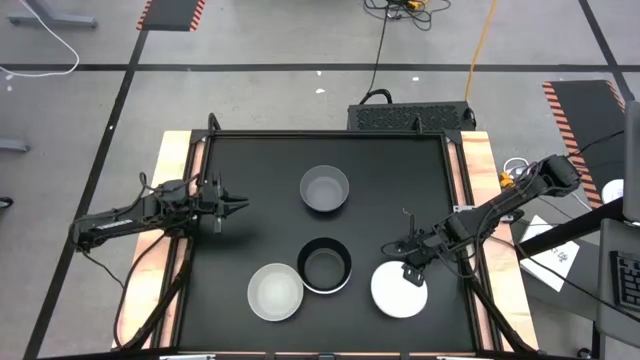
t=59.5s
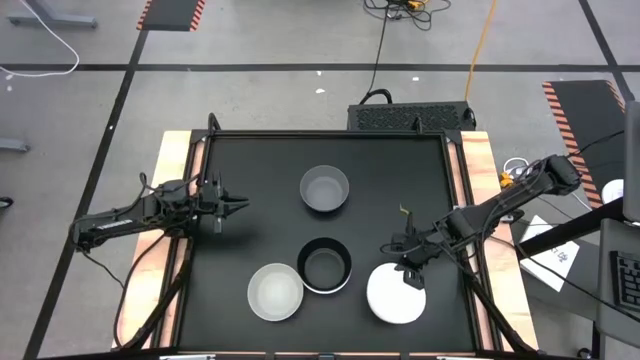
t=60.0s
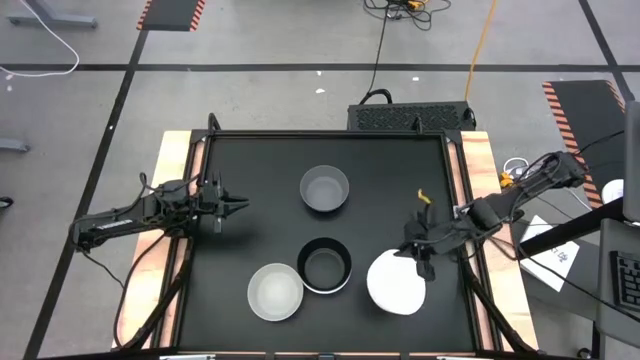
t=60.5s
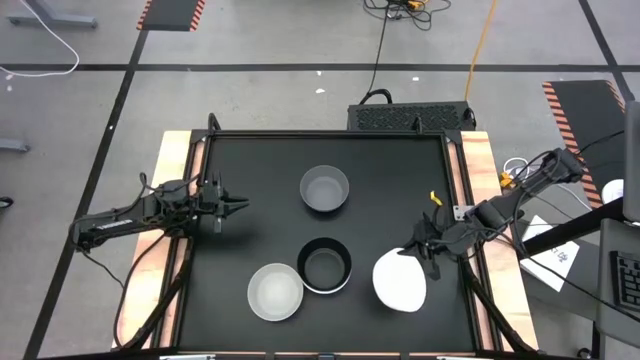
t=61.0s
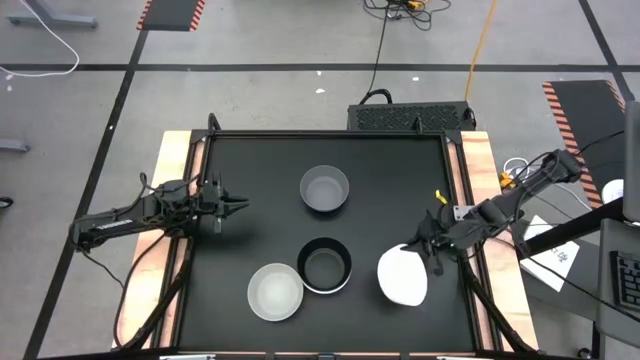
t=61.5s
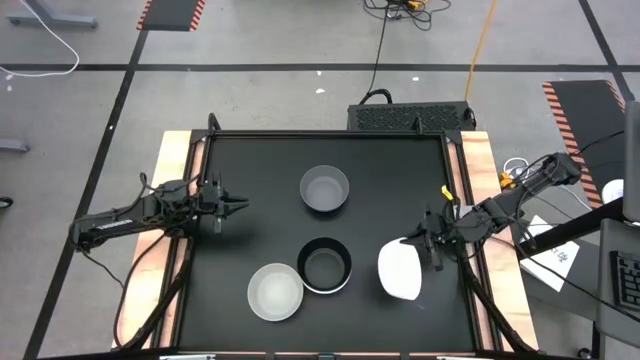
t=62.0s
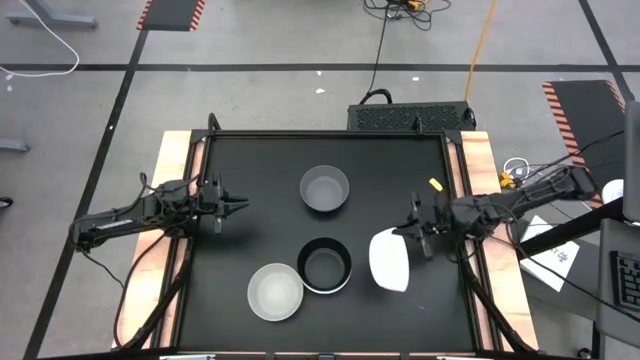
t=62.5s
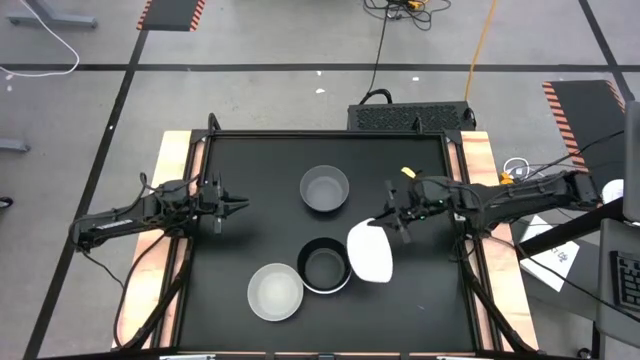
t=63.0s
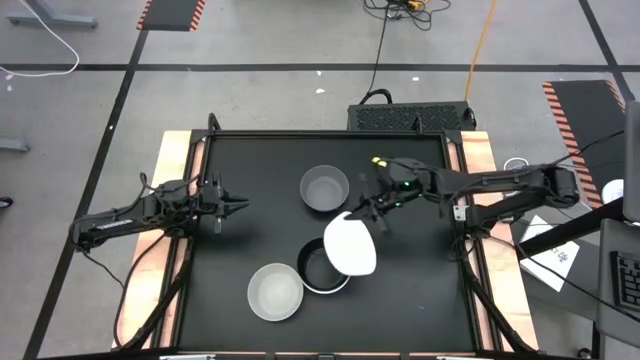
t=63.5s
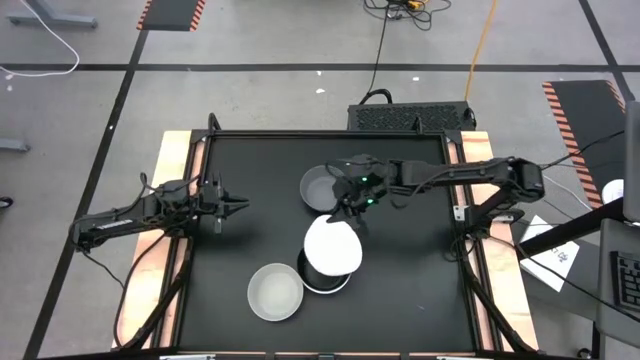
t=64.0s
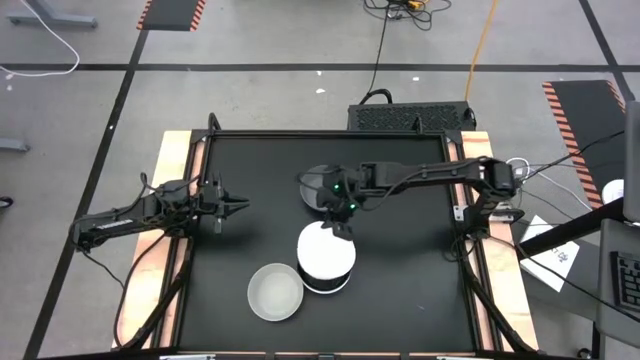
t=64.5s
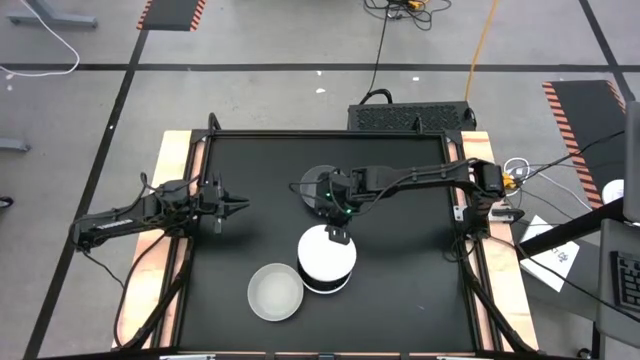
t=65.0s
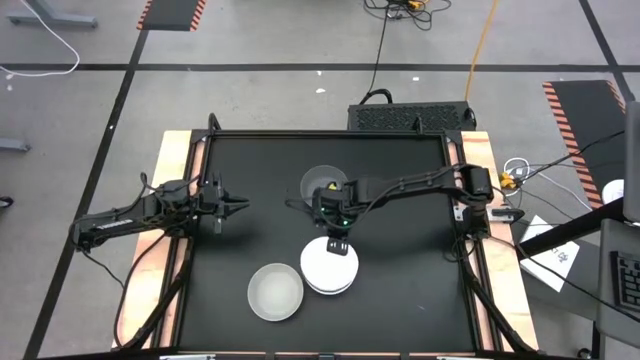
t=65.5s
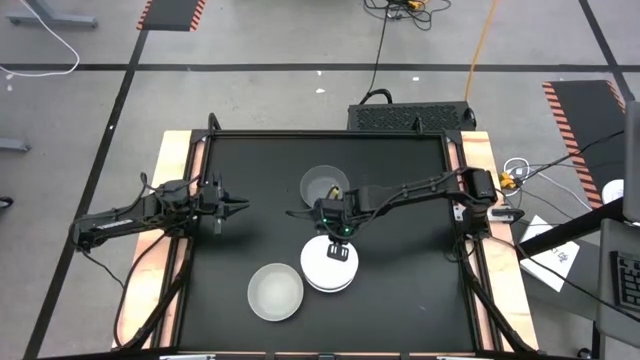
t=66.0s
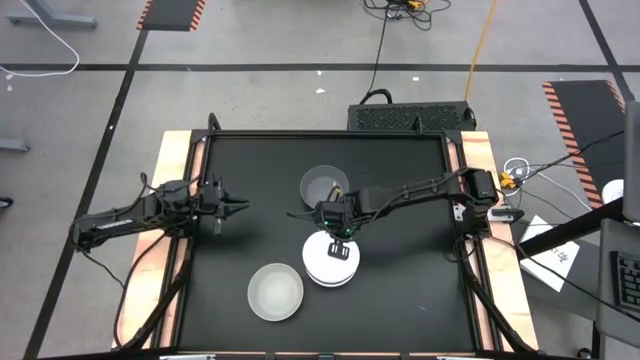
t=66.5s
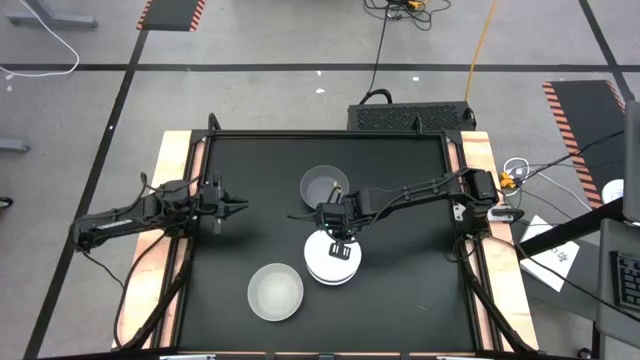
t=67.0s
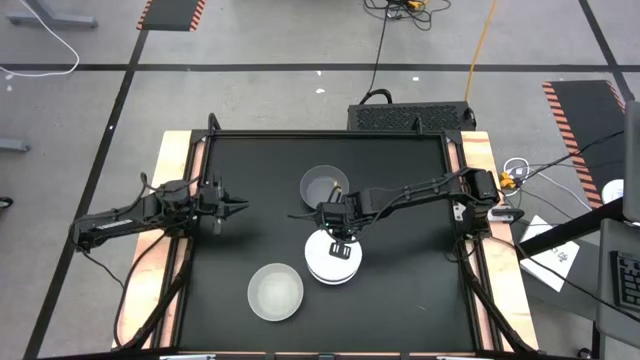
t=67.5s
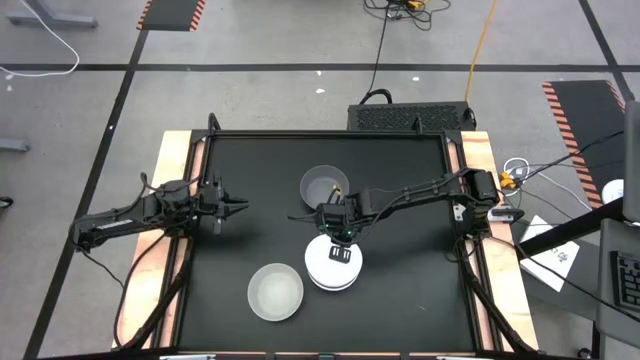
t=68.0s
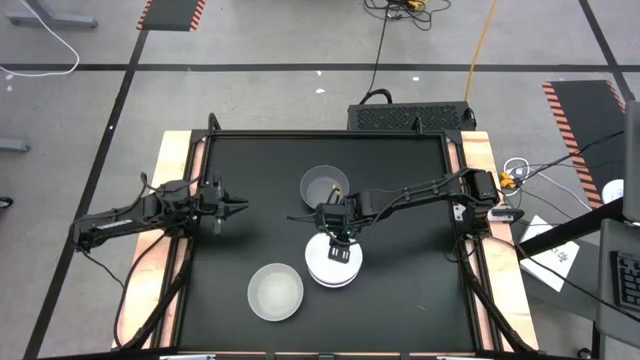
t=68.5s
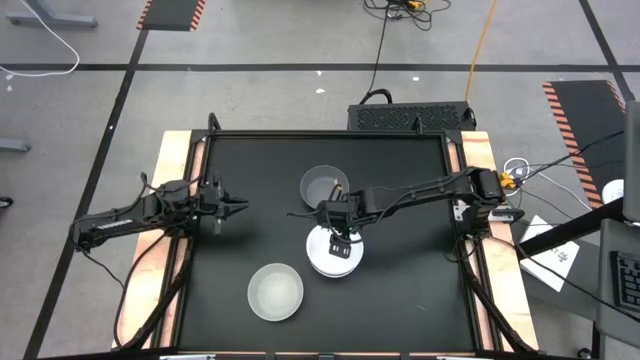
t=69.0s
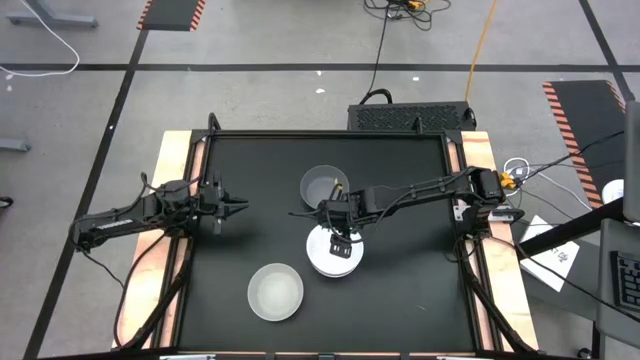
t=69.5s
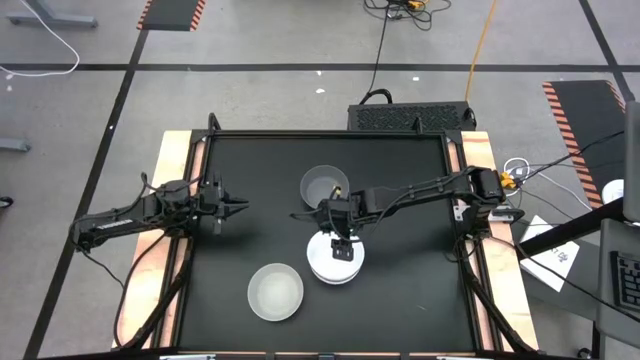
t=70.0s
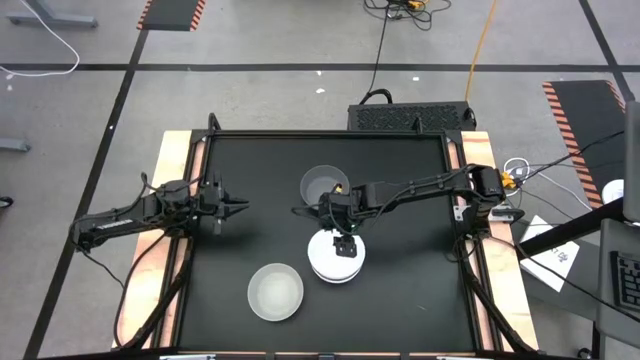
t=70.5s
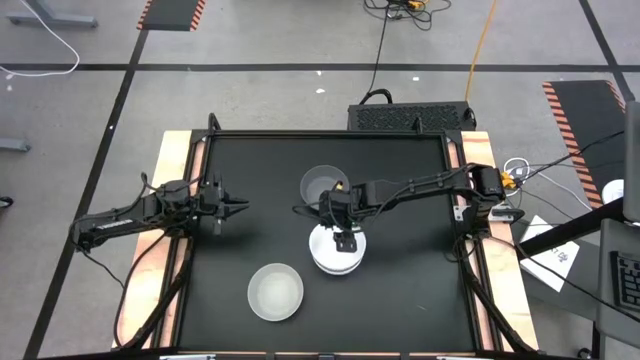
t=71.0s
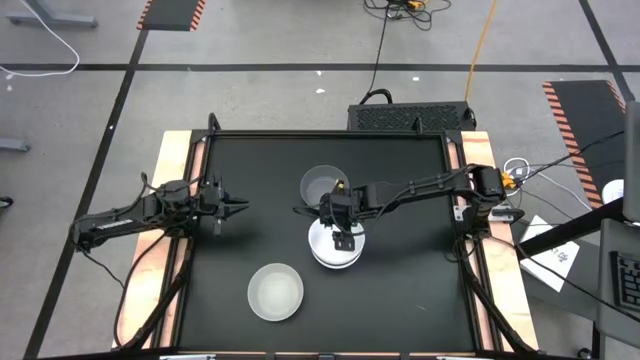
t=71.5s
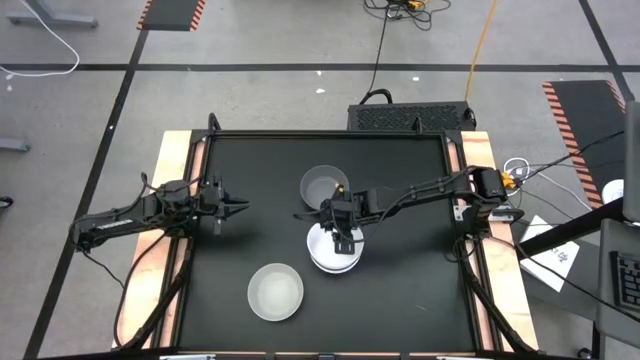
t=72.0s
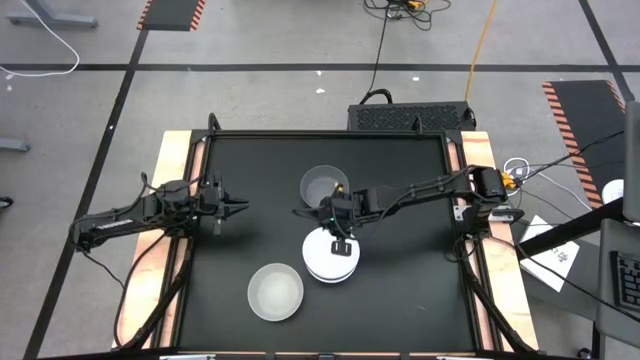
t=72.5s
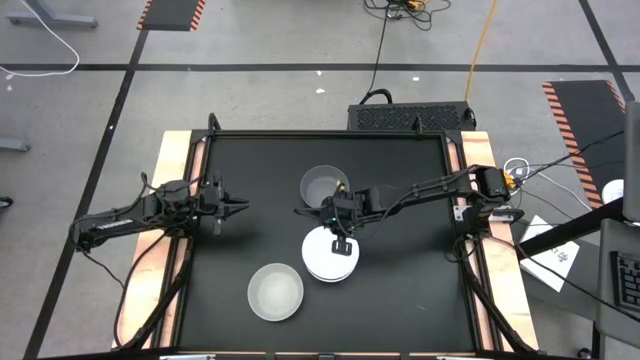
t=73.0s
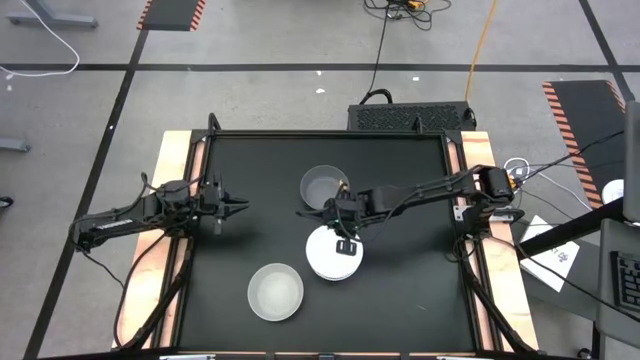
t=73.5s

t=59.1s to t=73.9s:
Task: Nest bowls inside each other
Stack the white bowl on the black bowl

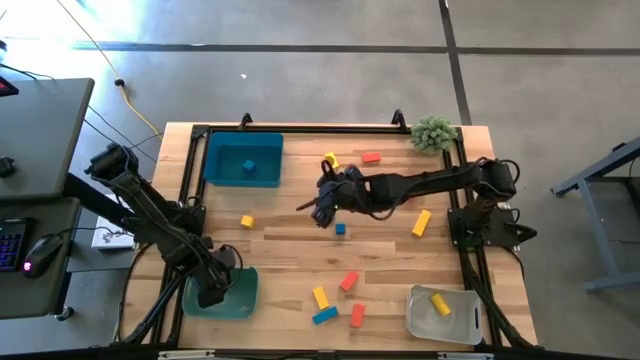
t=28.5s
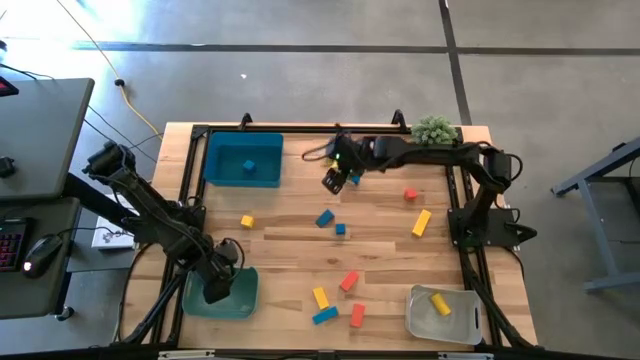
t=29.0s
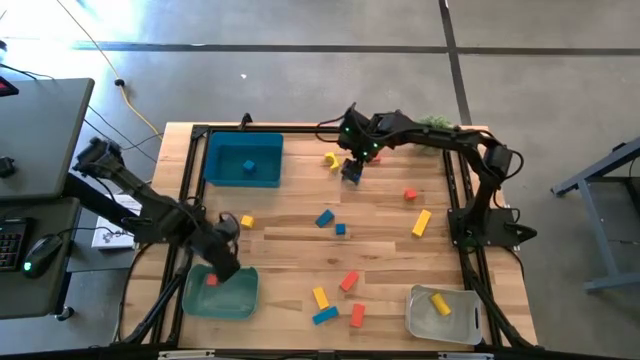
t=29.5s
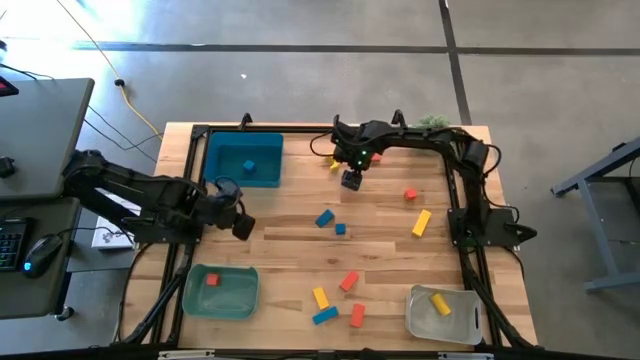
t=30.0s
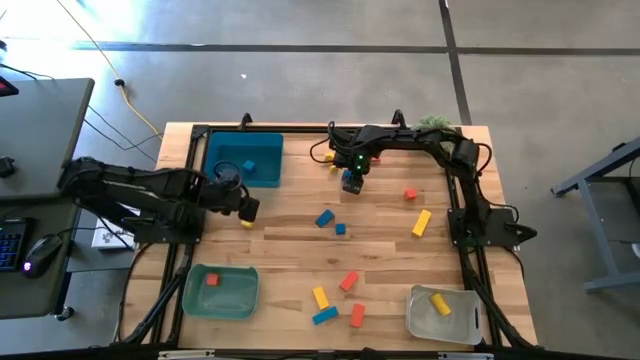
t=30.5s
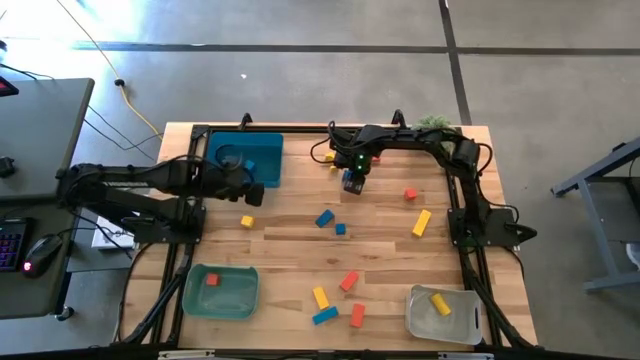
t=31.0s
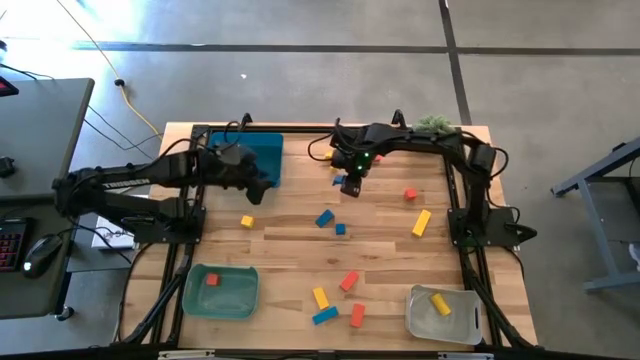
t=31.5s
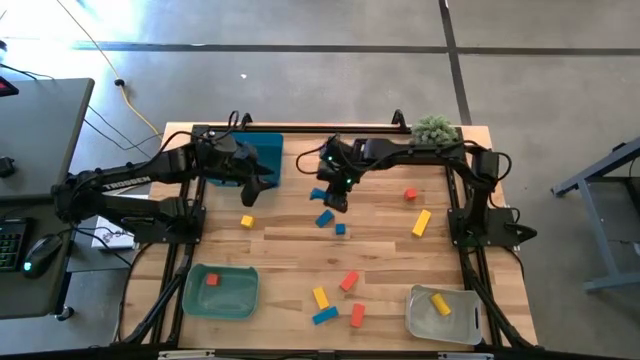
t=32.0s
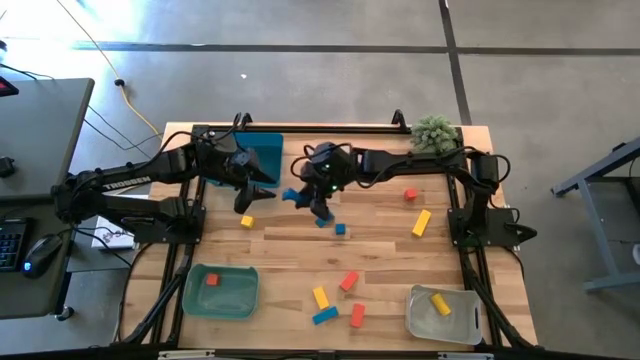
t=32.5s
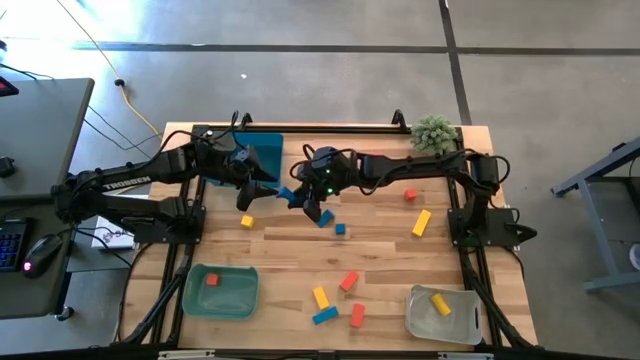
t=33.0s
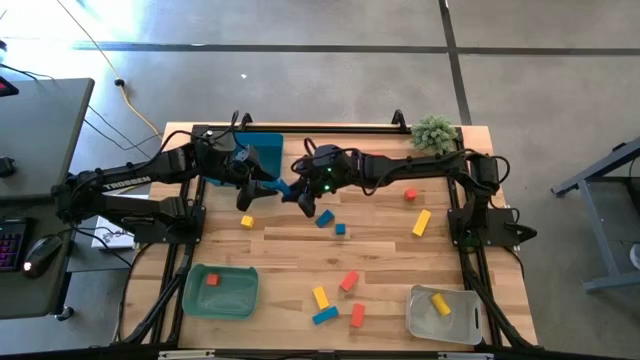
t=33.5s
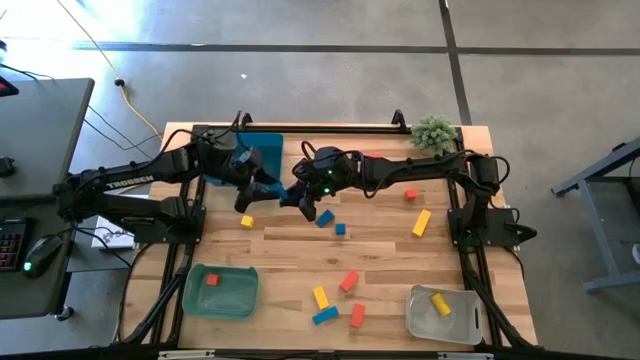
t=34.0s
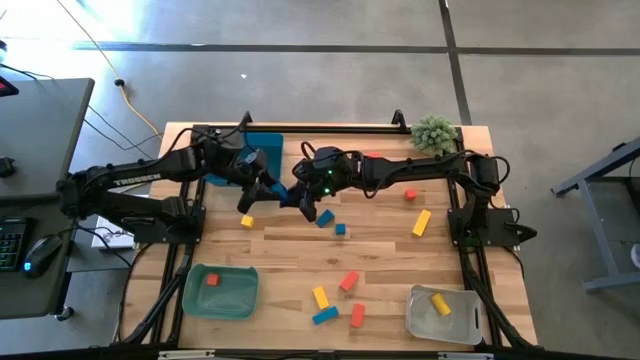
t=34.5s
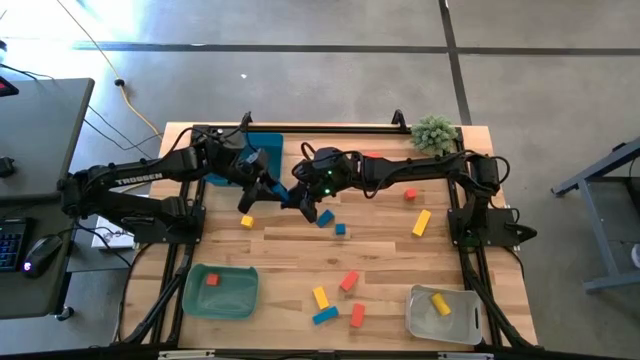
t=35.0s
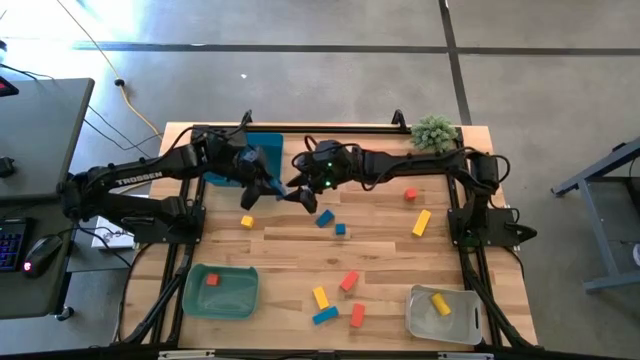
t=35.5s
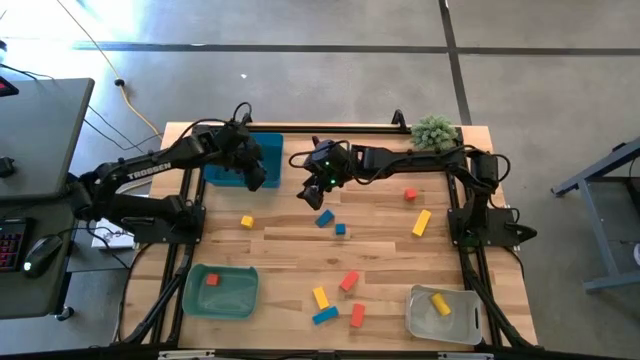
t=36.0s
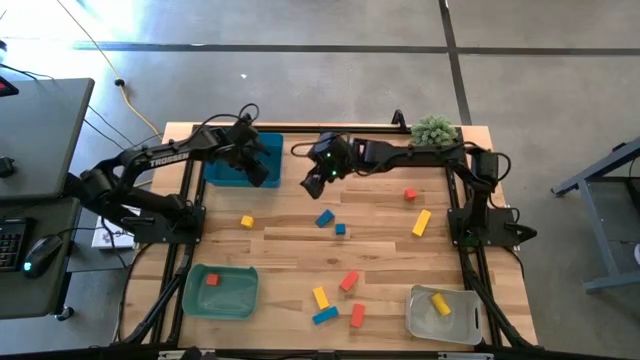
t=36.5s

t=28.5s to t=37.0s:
Task: Sort & place blocks by color
Put the blue block into the blue bin
